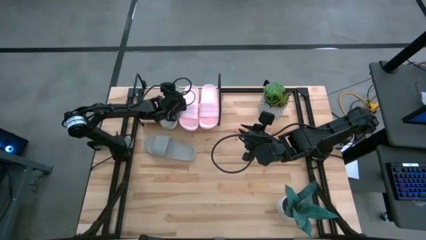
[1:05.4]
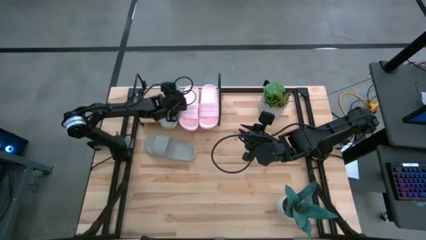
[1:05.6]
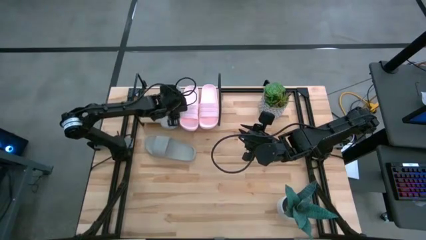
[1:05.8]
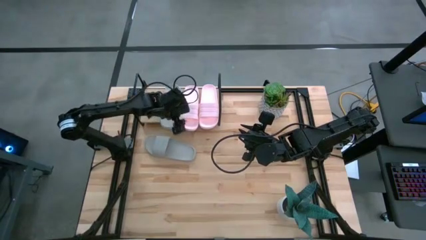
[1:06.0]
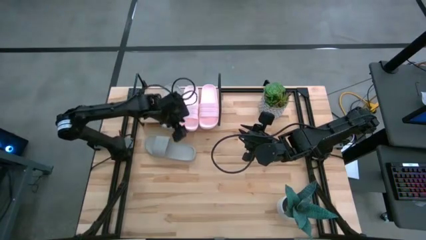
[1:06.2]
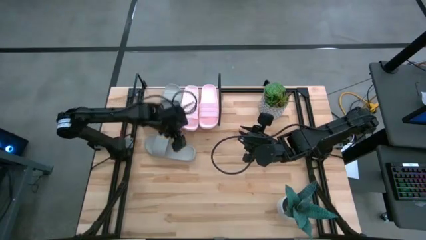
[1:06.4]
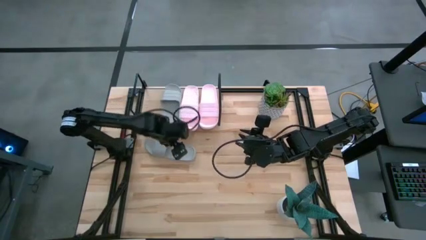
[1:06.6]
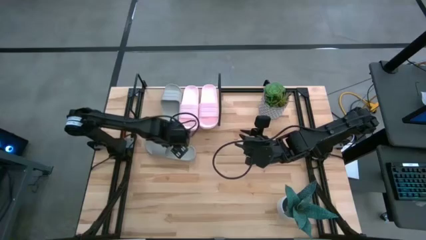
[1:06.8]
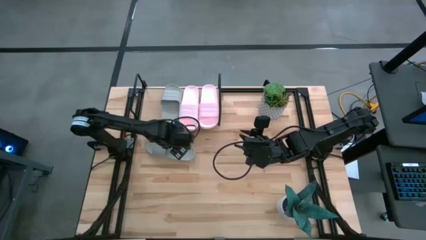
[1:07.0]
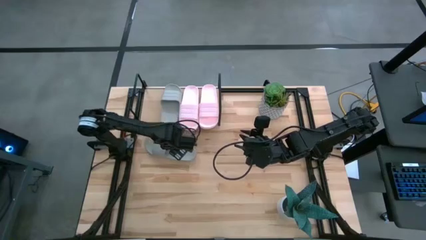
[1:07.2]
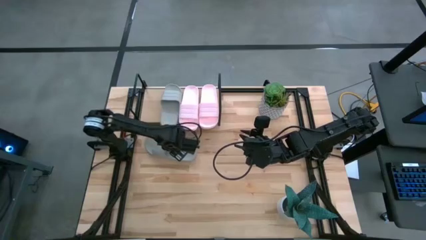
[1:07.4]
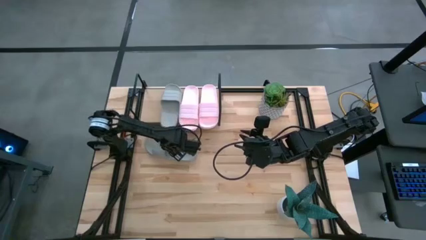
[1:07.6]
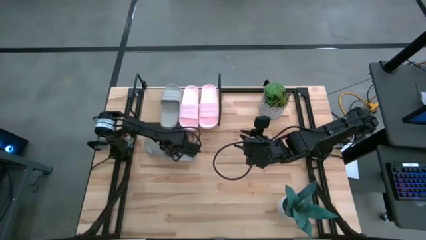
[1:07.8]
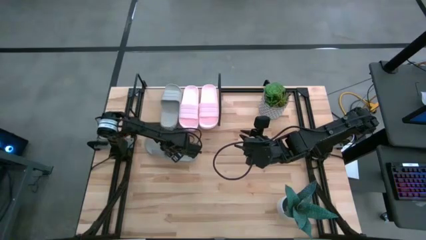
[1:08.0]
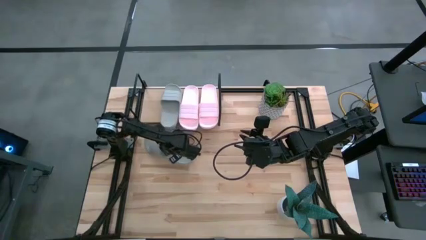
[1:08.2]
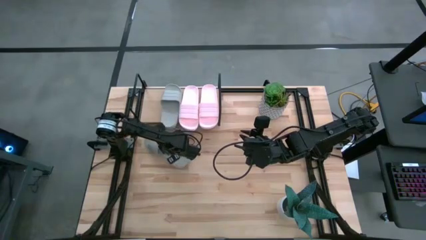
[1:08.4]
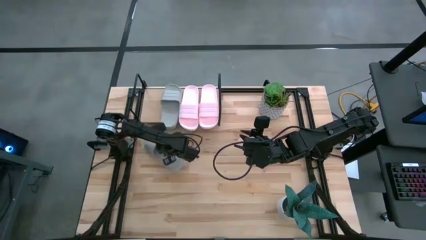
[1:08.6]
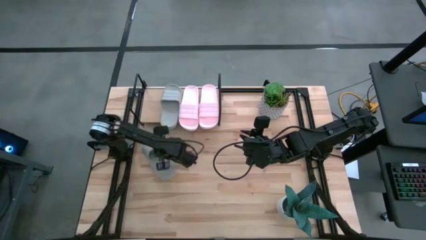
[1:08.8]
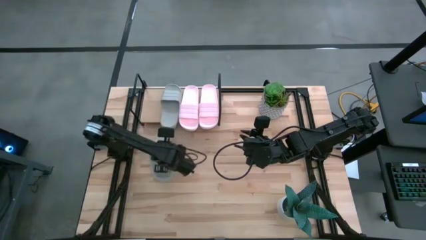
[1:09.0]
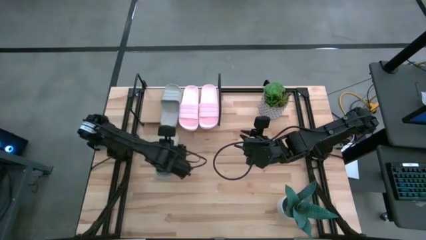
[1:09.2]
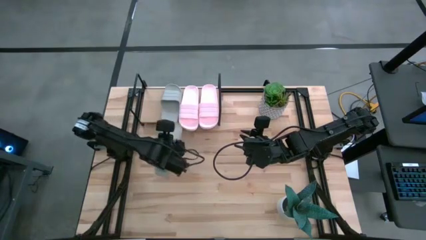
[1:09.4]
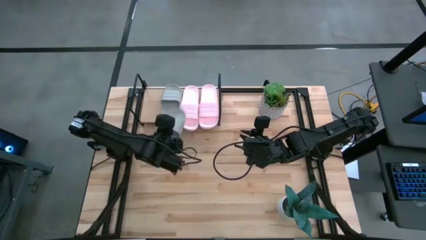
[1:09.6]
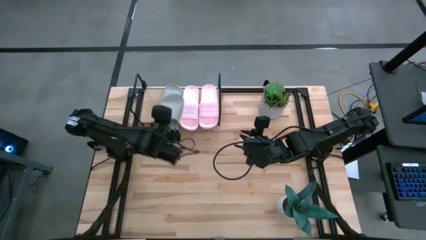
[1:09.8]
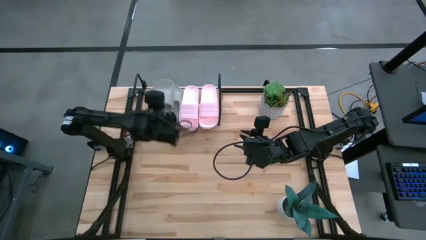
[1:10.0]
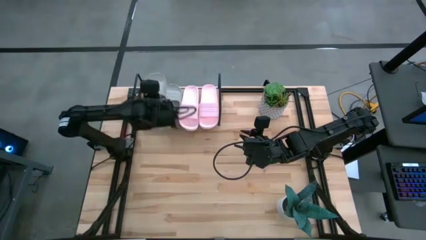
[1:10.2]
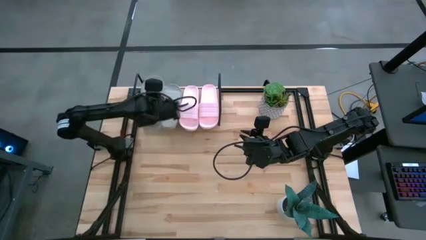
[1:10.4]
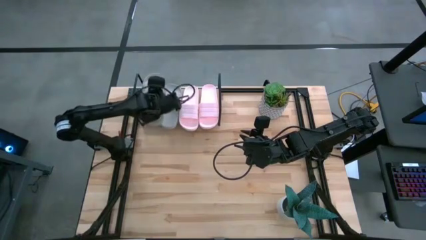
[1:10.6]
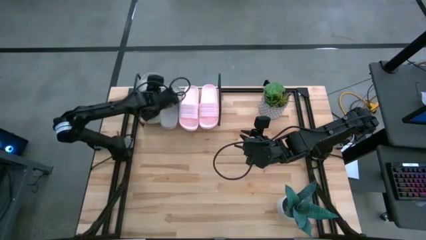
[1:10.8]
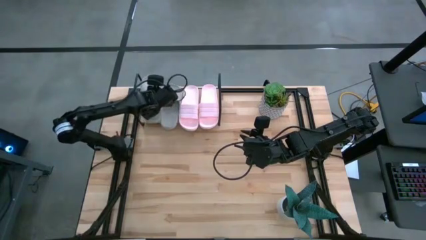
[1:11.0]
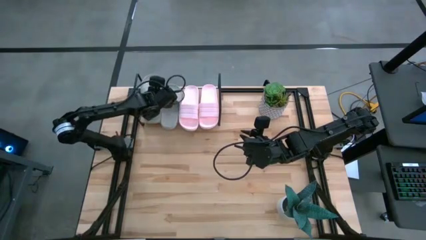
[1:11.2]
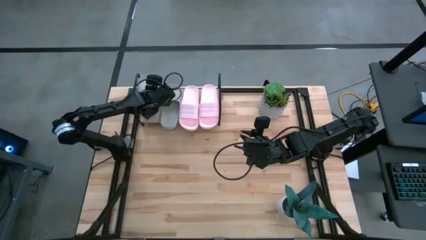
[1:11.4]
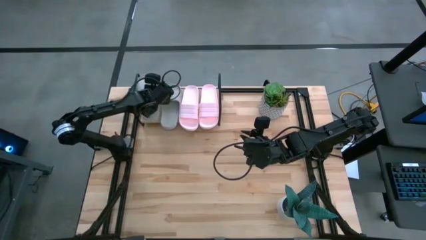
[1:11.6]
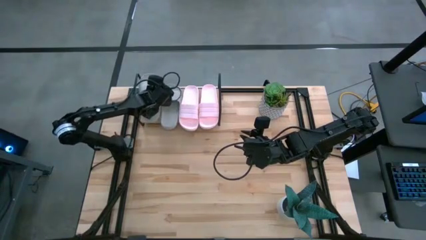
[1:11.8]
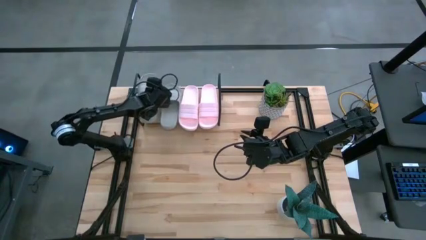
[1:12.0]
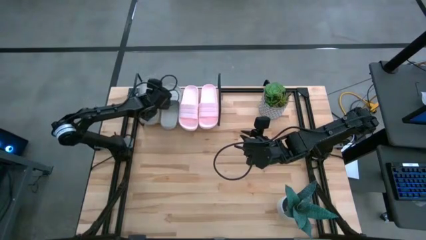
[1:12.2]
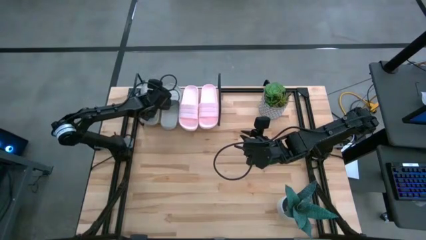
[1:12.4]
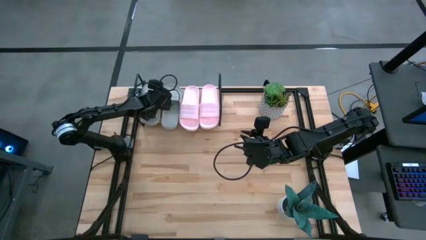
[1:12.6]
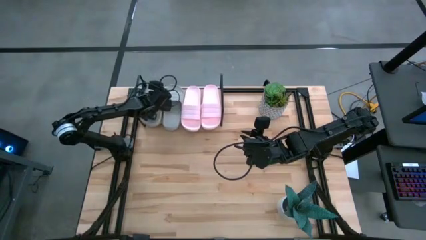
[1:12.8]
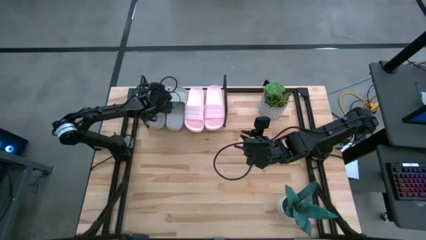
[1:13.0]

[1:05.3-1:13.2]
Task: Pick and place slides into the shelf
Put the gray slipper on the shelf

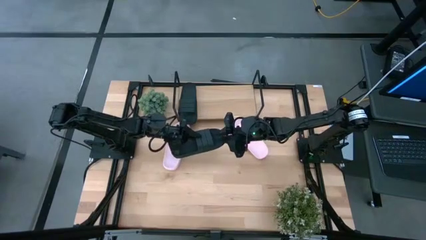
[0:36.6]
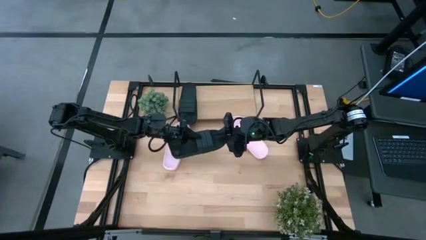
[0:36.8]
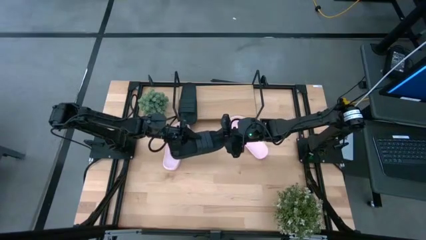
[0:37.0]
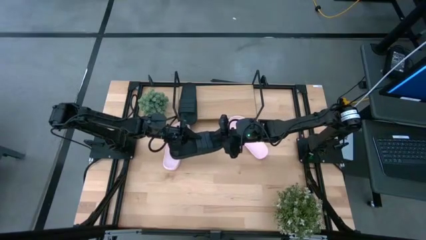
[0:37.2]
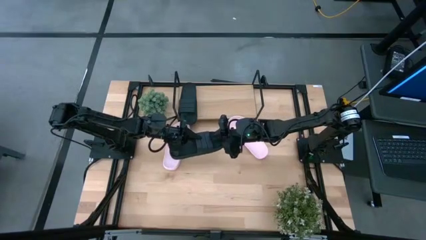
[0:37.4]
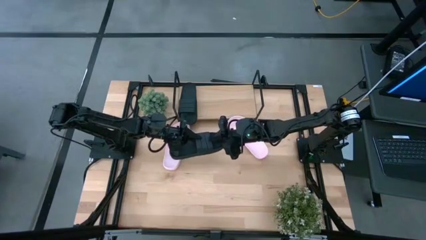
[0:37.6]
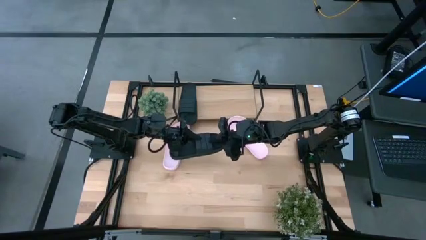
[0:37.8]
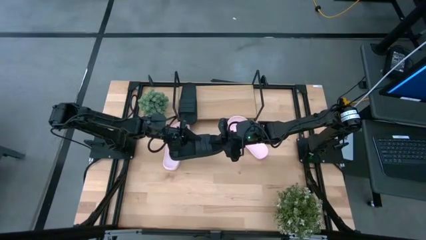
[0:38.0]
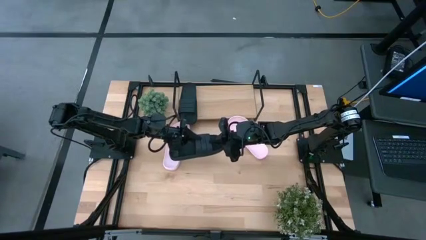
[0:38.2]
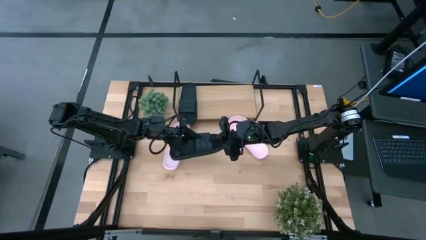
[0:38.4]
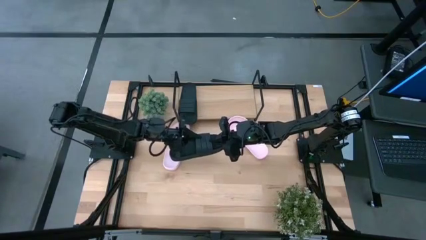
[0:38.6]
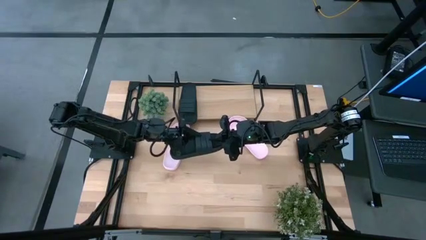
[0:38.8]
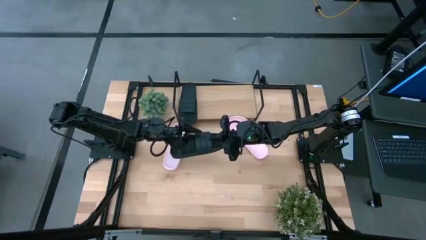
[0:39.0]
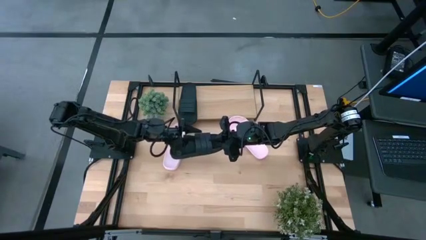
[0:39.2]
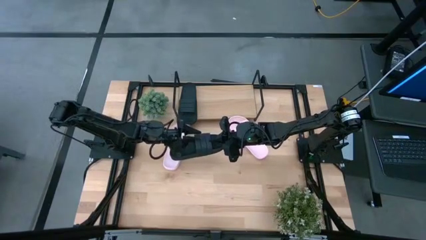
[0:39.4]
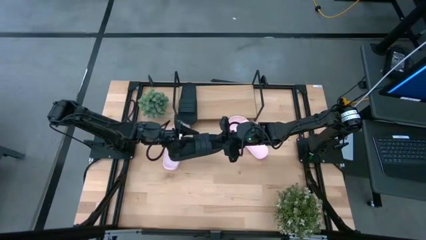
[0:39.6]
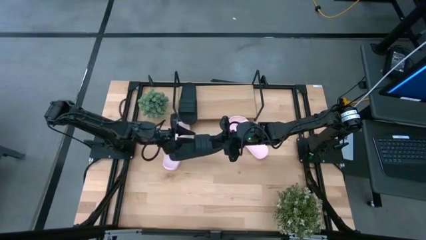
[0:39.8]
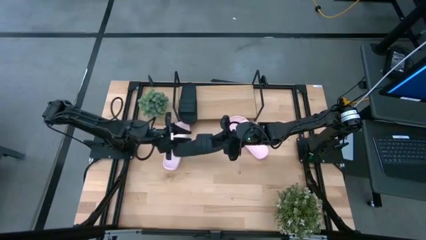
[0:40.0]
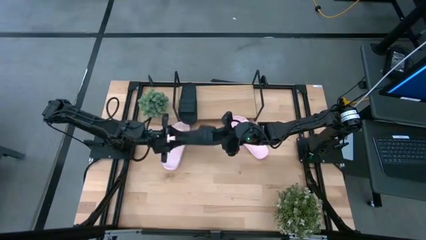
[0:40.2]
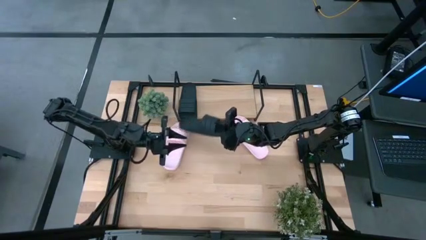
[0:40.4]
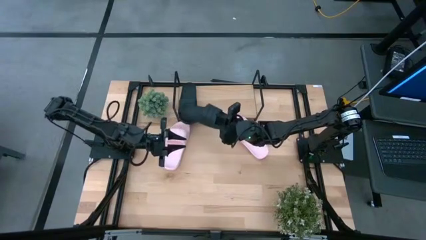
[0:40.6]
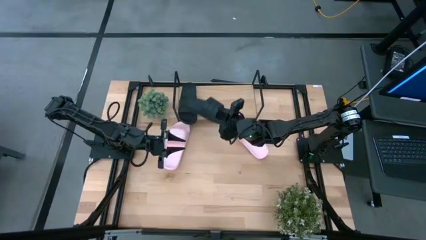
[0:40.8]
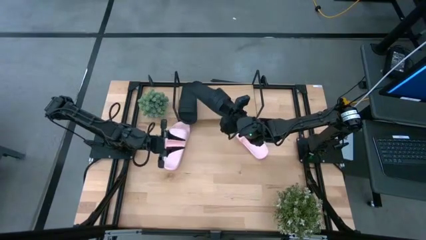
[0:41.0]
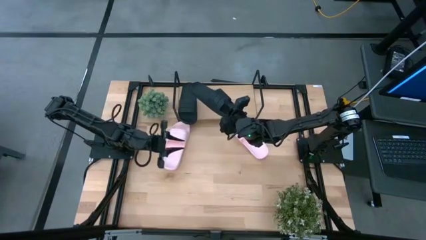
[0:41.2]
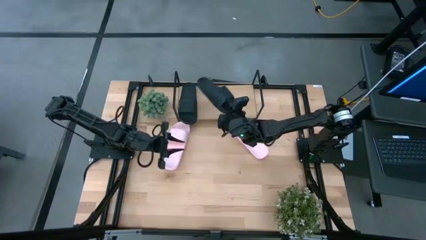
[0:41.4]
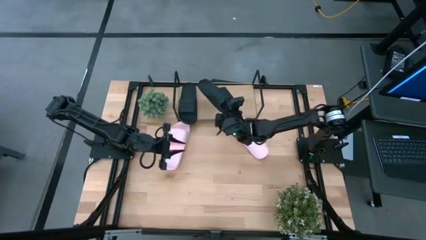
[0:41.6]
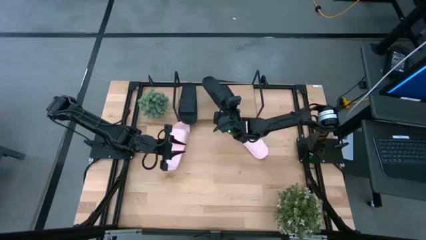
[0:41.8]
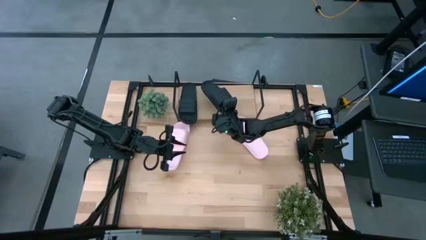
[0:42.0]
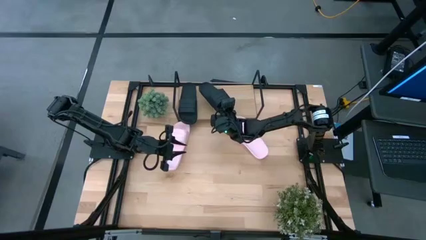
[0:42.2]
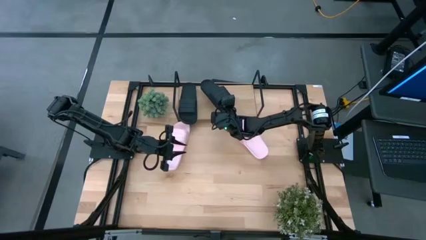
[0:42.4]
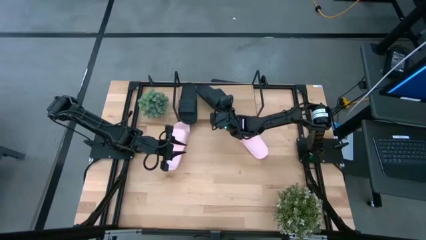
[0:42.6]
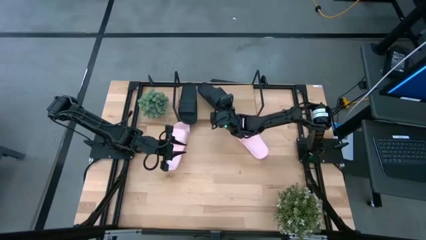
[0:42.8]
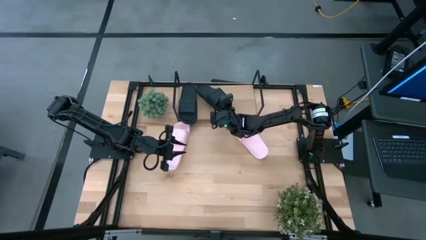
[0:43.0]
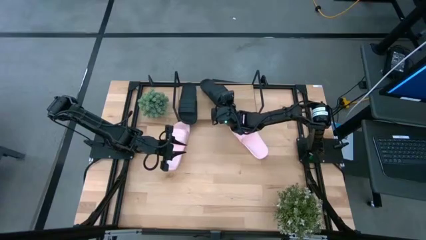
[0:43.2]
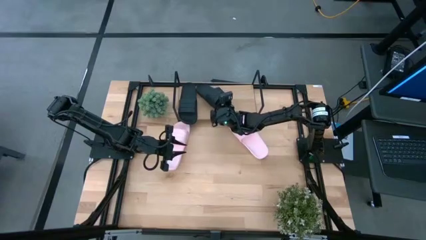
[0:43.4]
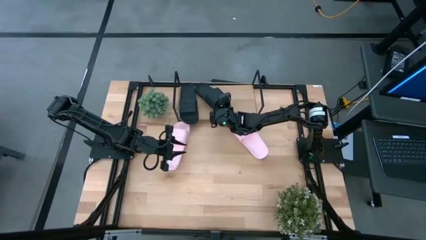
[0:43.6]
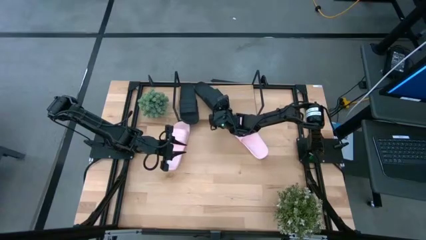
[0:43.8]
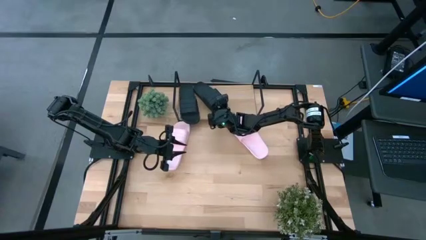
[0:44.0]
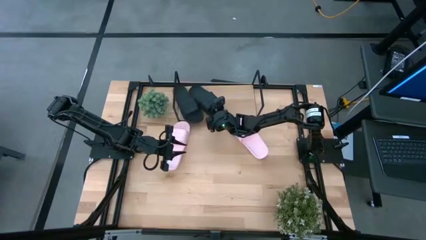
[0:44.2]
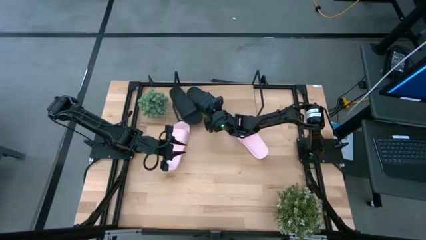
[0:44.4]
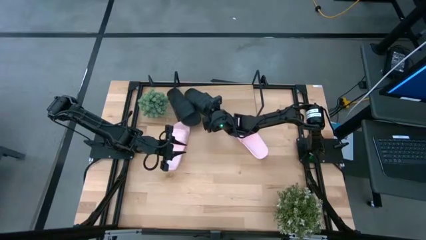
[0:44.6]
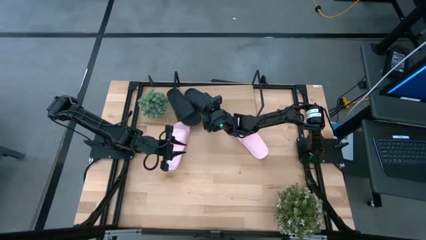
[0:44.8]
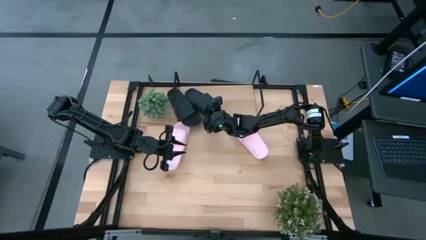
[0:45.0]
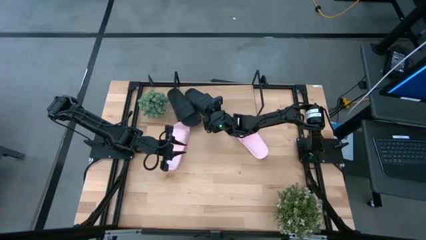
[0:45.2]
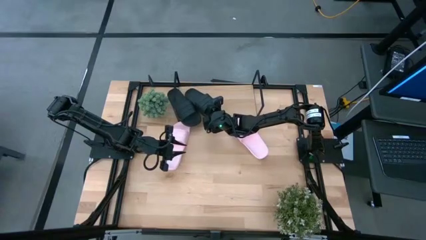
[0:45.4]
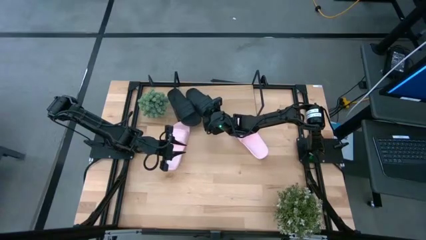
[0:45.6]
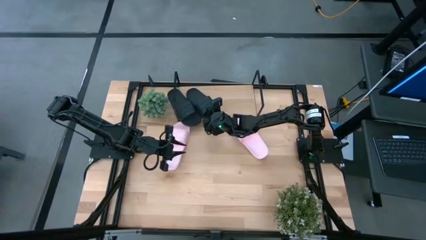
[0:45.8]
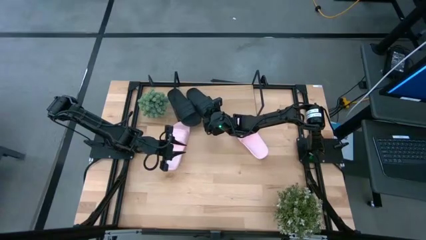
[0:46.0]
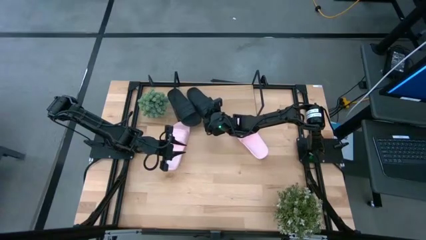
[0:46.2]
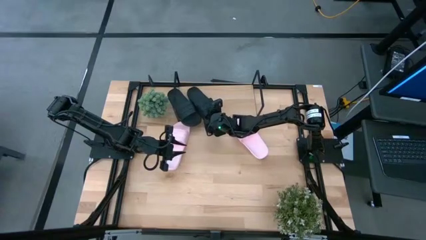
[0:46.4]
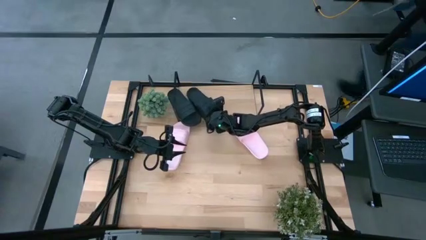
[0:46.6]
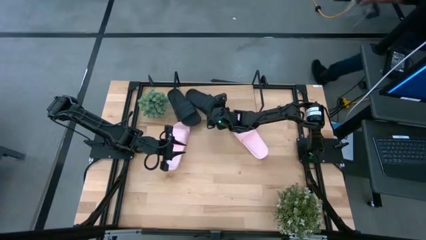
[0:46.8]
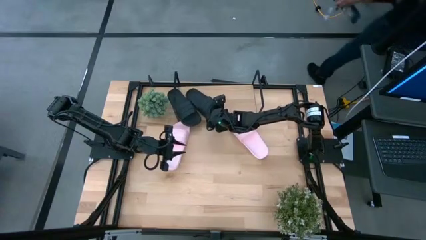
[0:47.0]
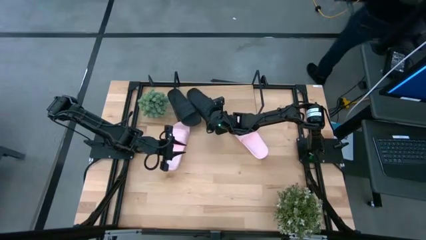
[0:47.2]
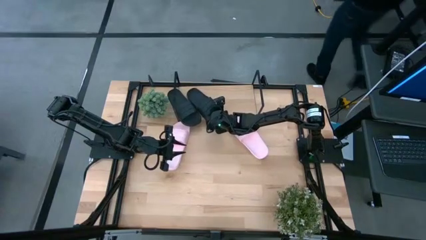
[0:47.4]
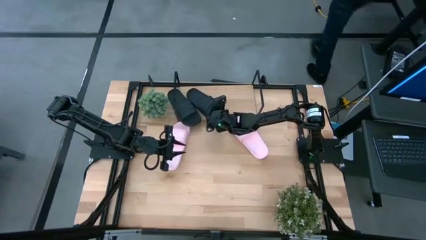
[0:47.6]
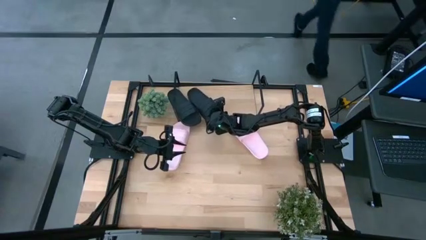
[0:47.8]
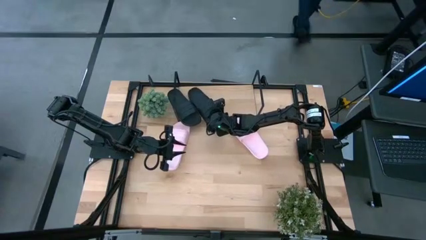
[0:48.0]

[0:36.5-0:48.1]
Task: Pick and place slides into the shelf
Put the black slide on the shelf
